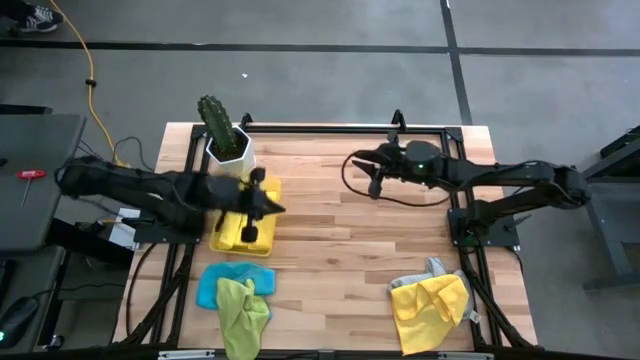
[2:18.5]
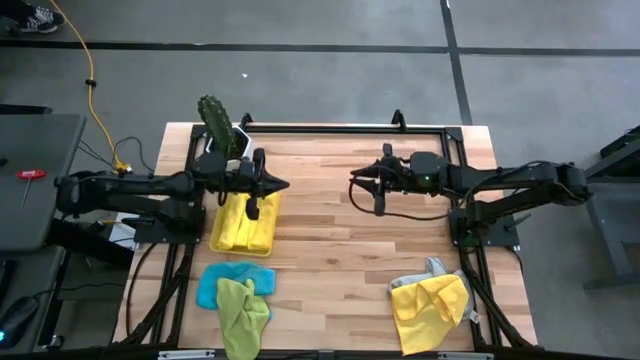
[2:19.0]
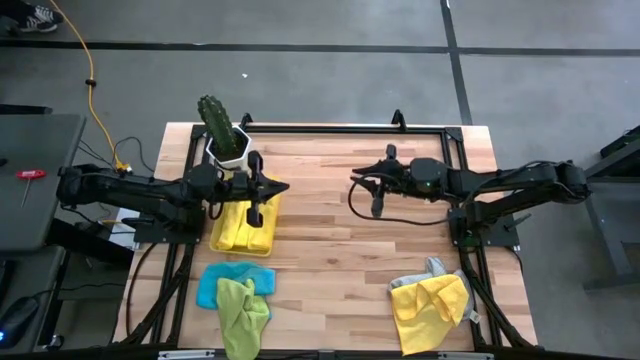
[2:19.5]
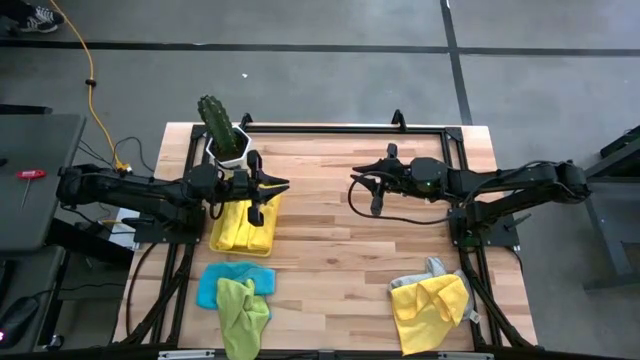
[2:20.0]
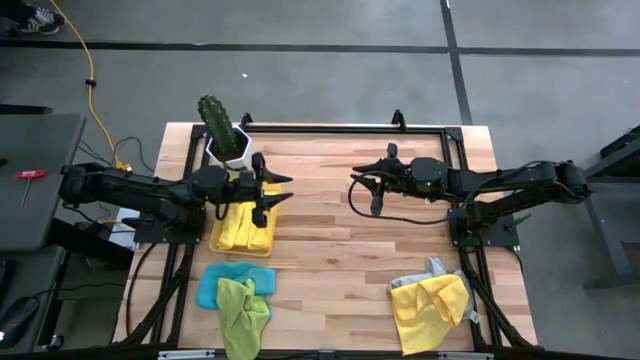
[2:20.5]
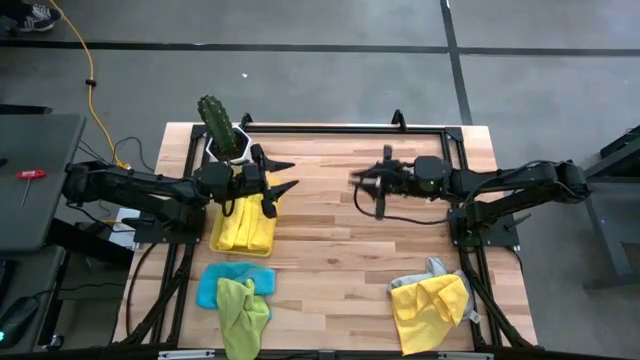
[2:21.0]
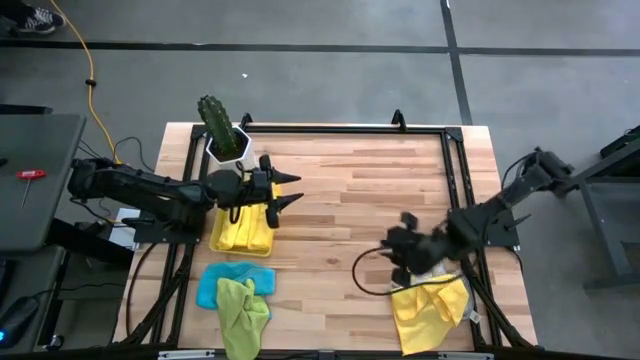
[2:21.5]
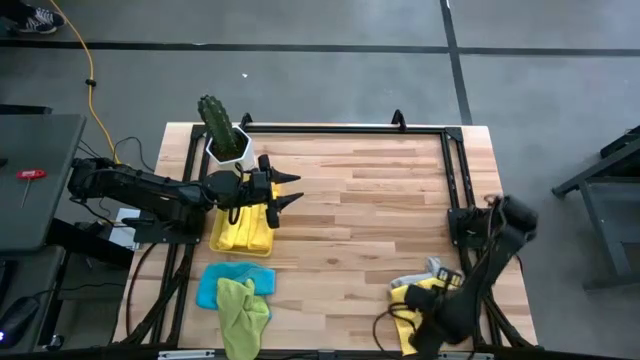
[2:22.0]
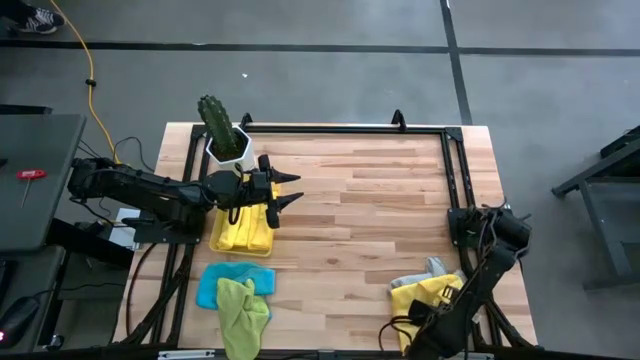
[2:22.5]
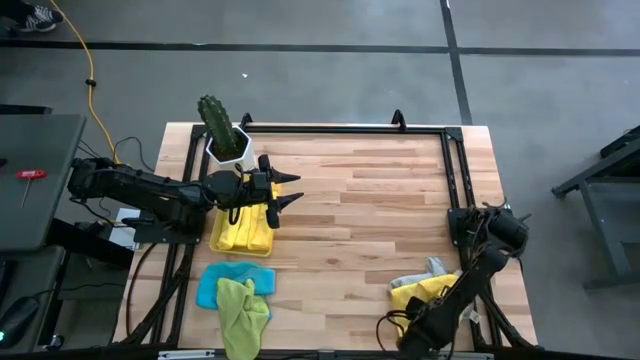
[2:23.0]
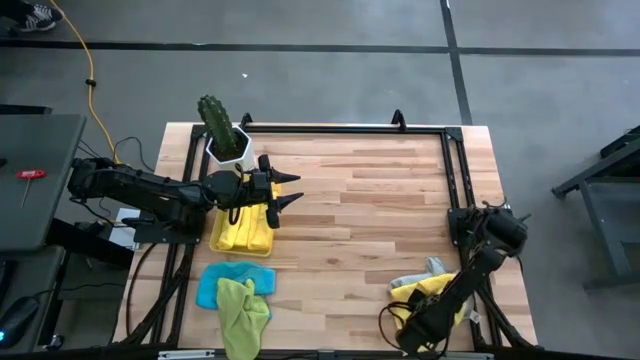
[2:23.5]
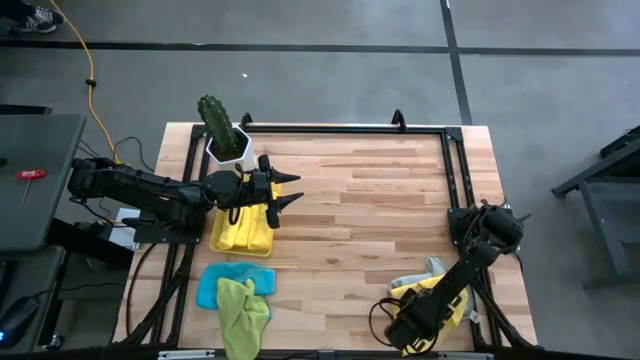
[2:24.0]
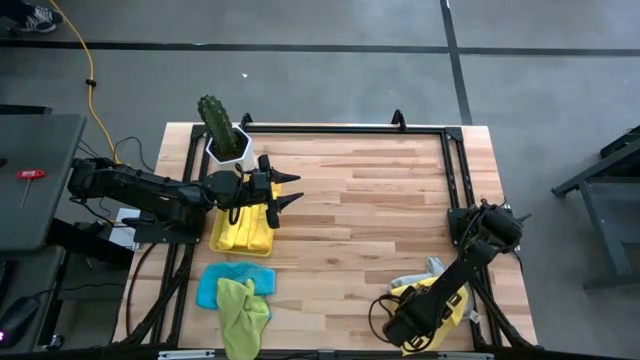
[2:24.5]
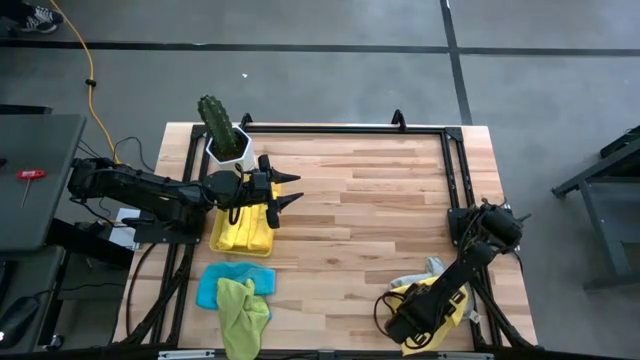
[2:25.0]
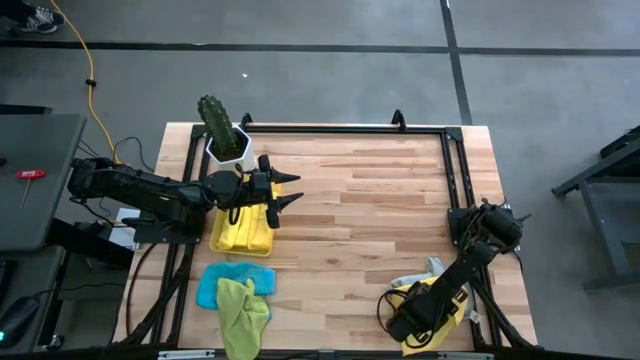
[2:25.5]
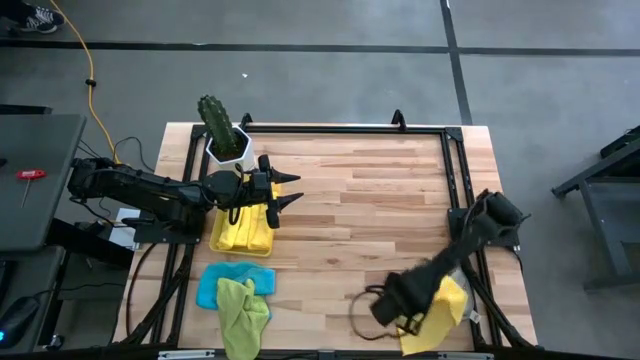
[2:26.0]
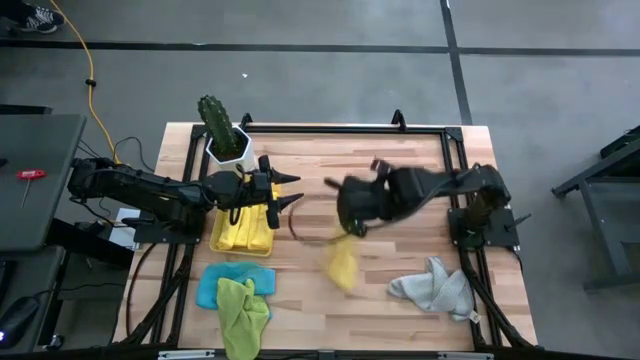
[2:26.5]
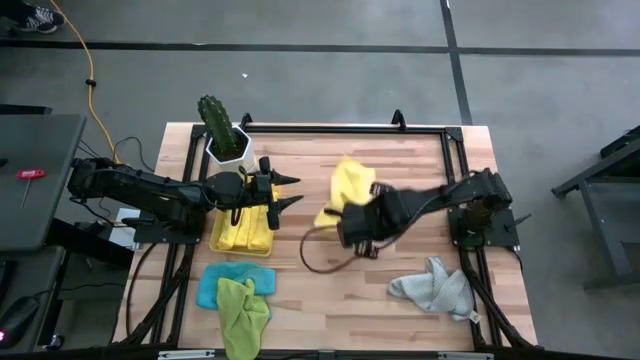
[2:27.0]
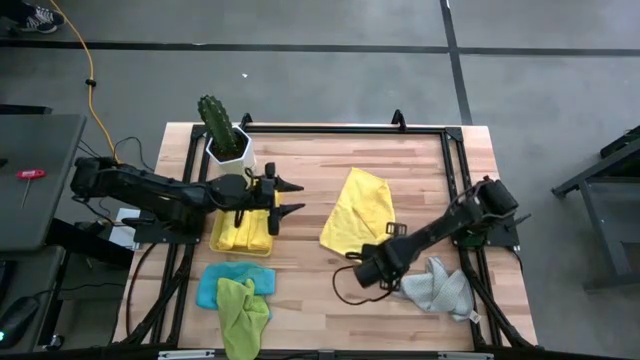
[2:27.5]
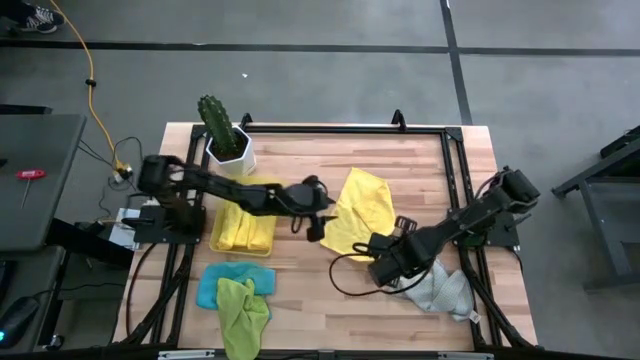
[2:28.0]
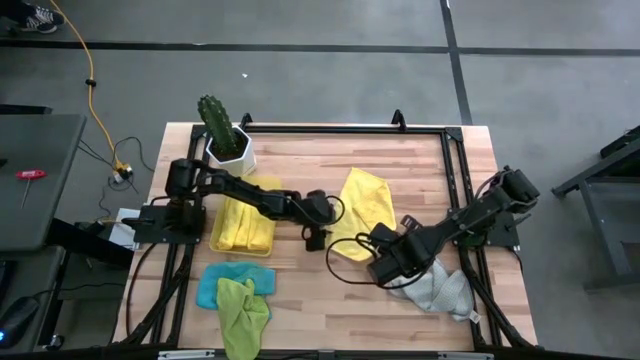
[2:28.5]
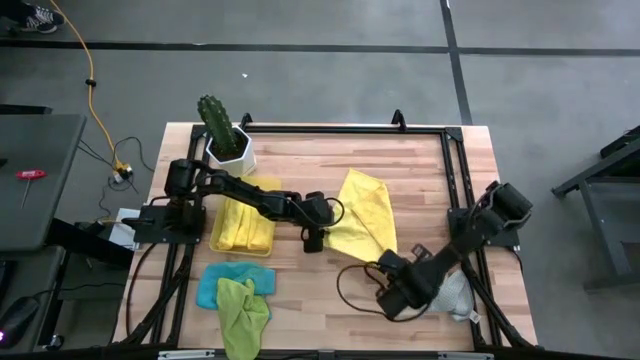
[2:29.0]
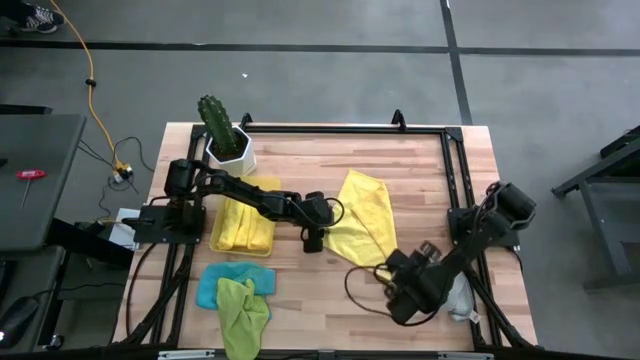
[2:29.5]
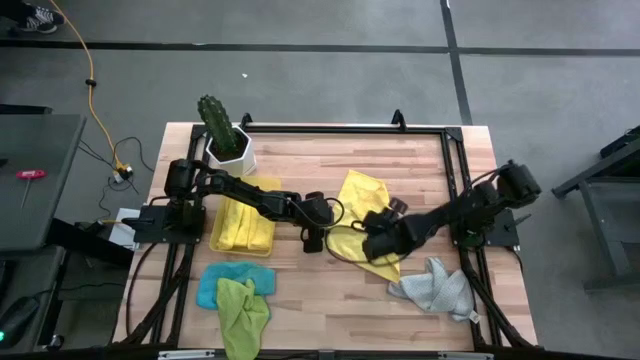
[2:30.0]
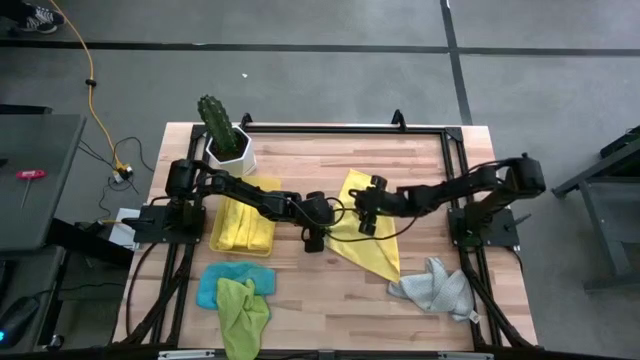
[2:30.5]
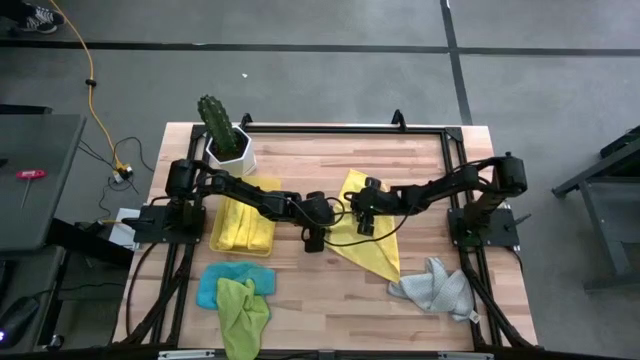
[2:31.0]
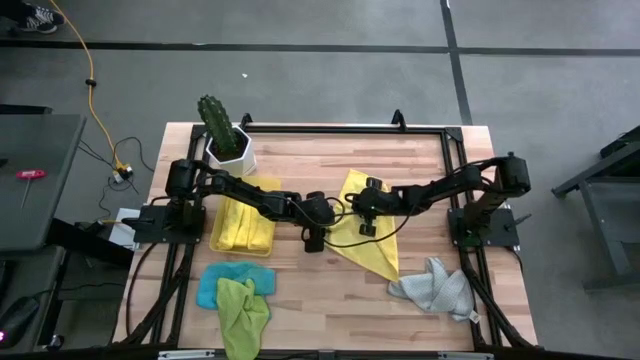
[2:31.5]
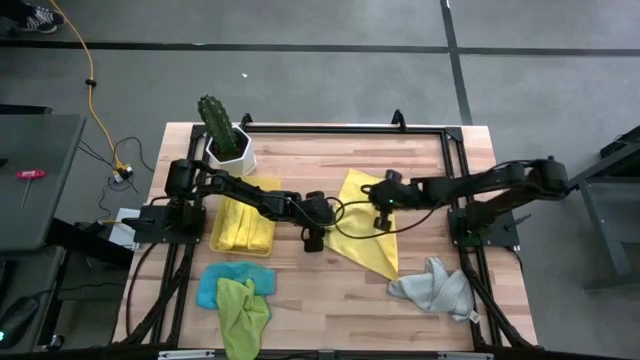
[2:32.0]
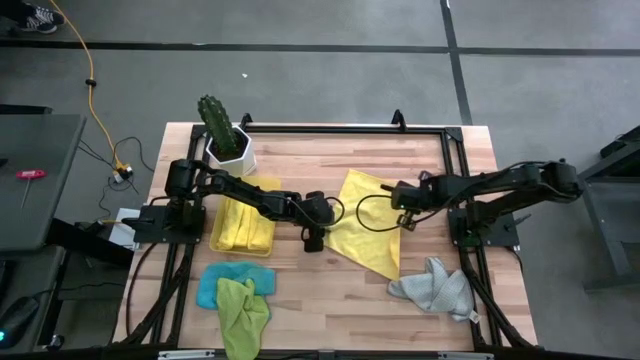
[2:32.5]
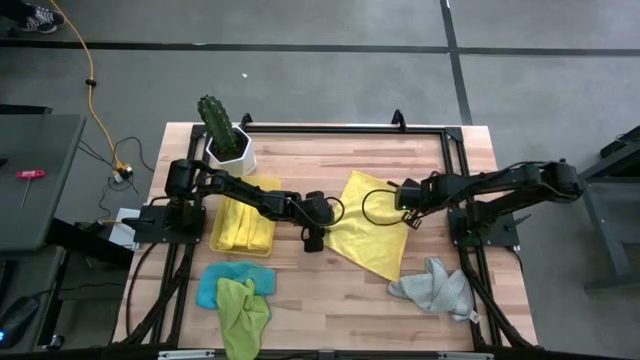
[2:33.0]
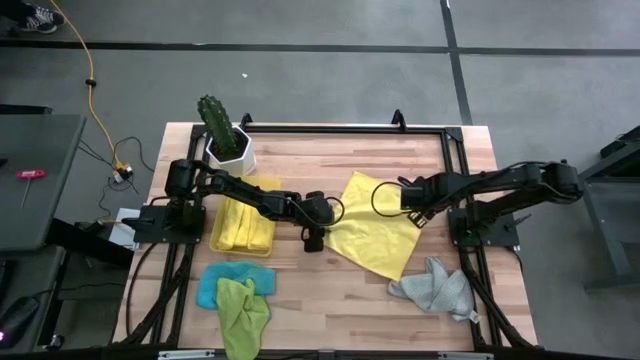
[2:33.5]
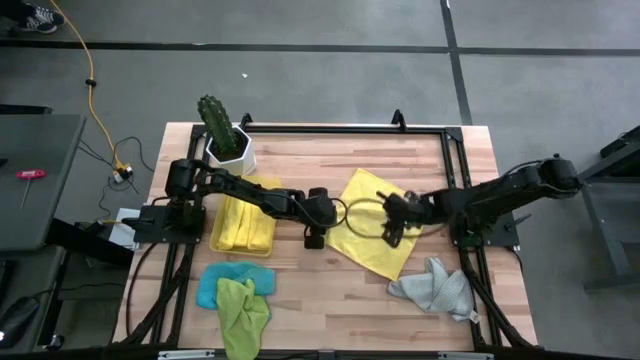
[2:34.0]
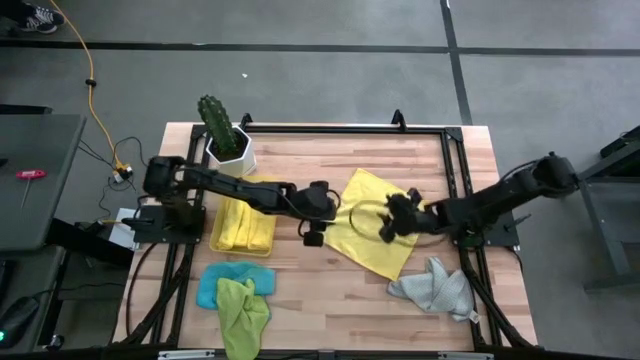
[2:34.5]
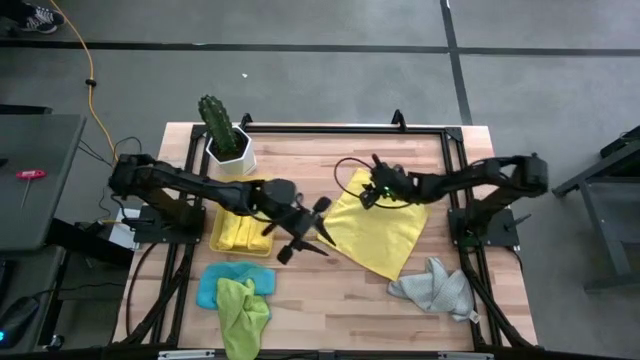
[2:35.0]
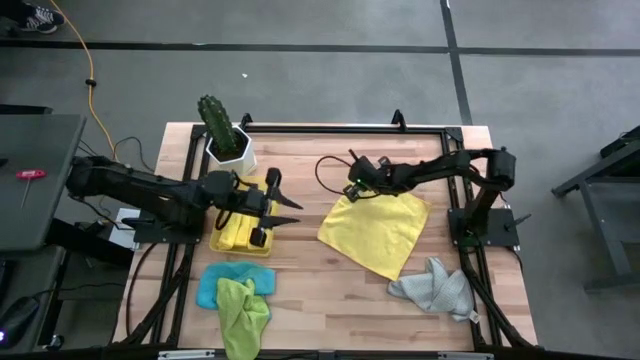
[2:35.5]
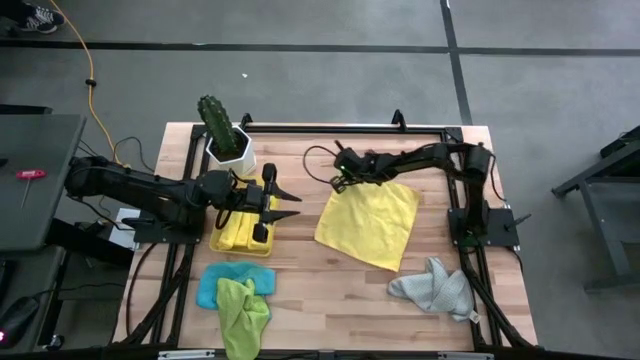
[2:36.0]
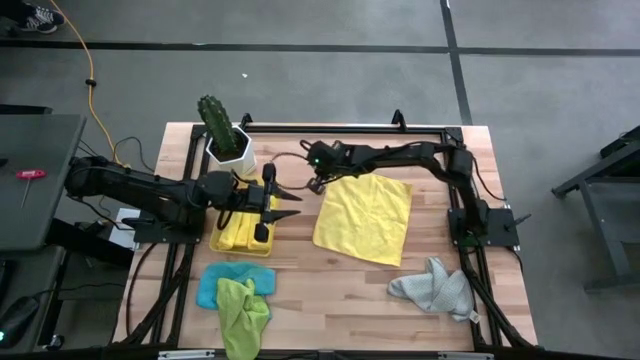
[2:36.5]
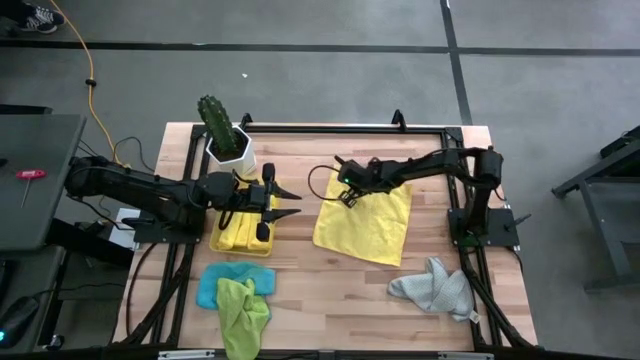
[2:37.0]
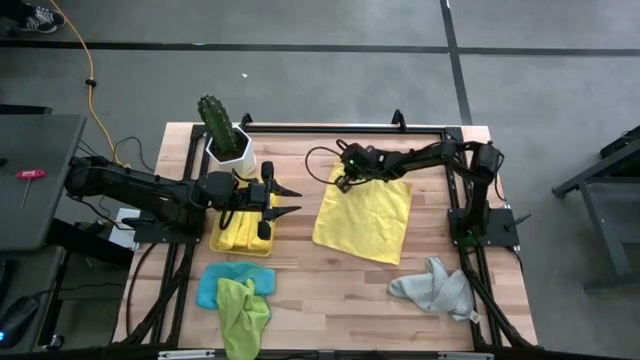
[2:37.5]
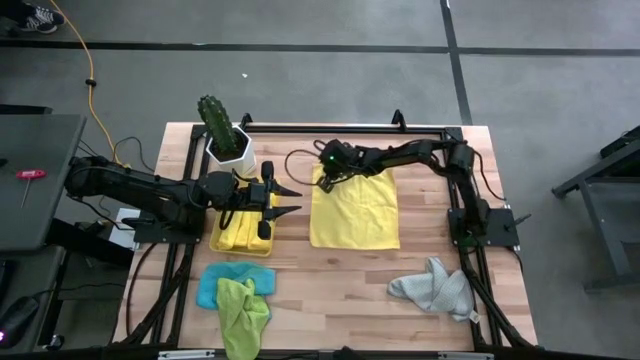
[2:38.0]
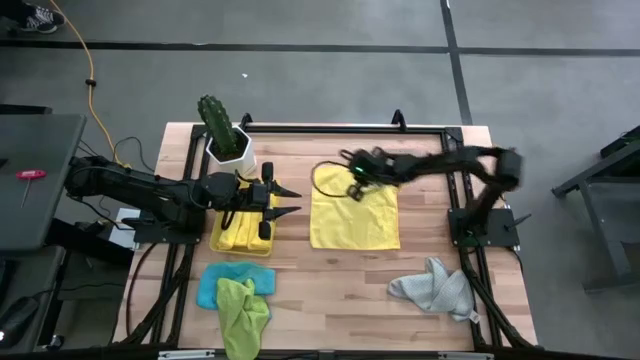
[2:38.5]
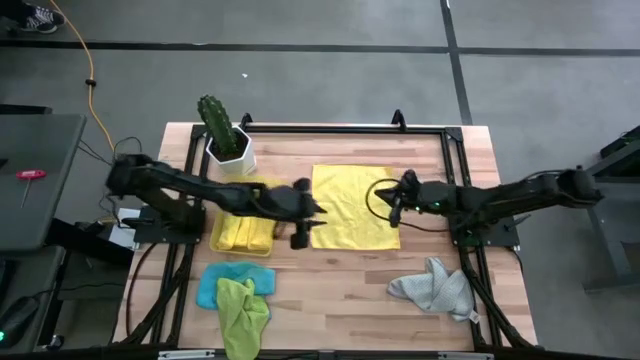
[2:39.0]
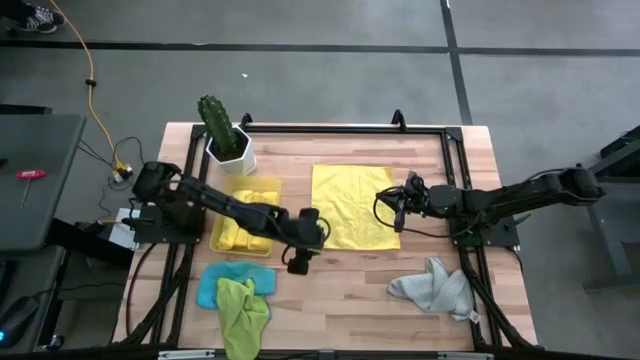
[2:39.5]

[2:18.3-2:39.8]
Task: Fold microfiber towels
Fold the yellow microfiber towel
